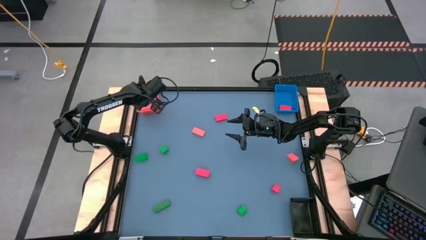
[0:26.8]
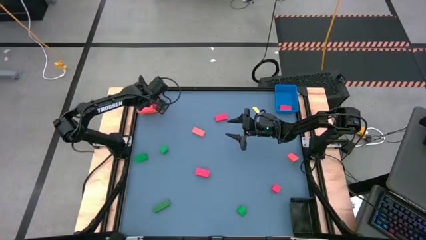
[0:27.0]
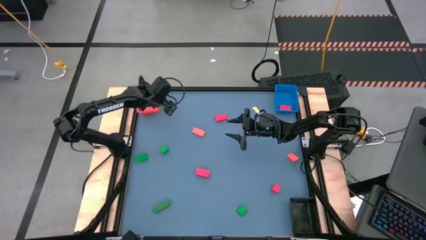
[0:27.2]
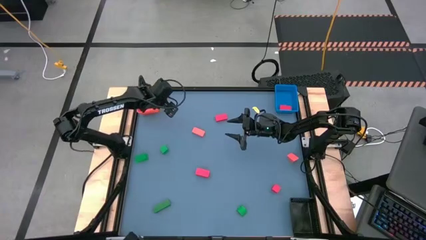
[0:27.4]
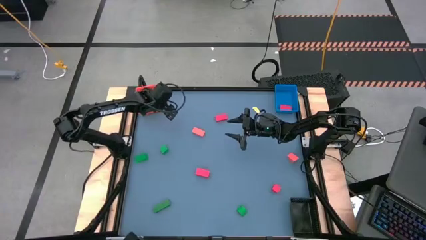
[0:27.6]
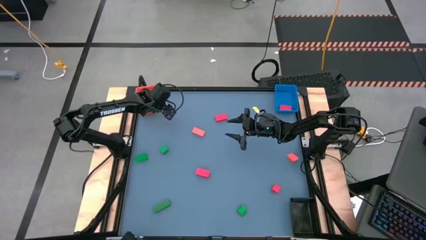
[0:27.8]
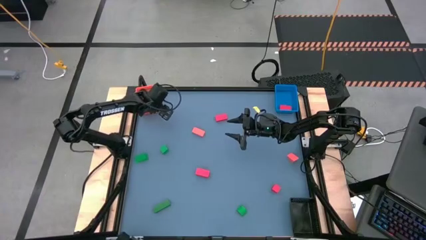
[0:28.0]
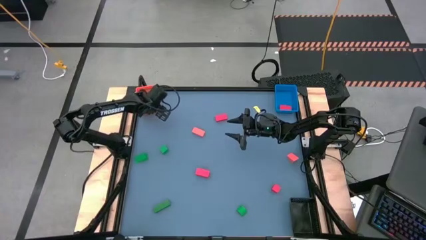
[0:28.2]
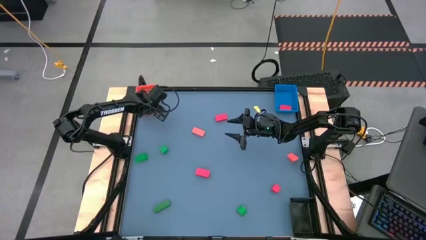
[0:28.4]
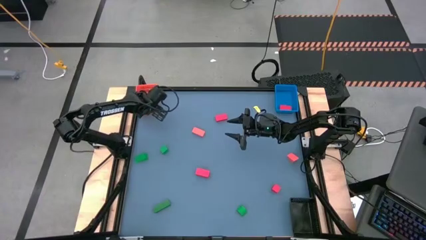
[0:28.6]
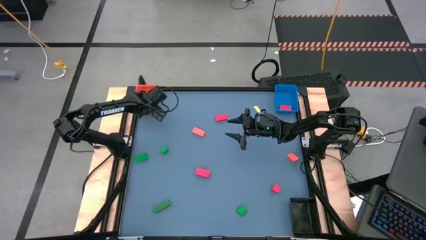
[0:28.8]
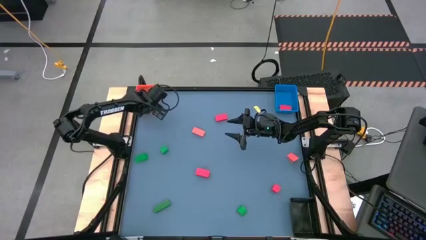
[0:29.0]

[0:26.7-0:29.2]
Task: Sort & place blocks by color
Adjust the orange bin

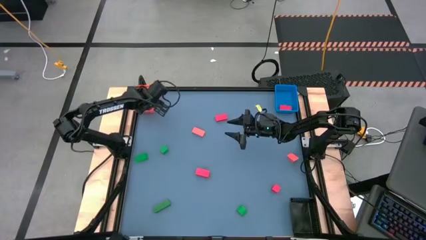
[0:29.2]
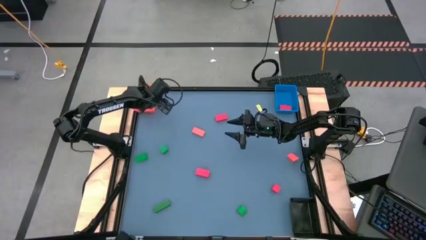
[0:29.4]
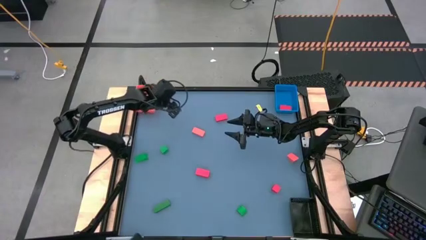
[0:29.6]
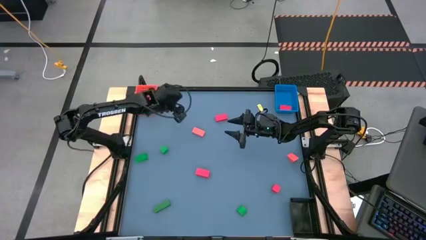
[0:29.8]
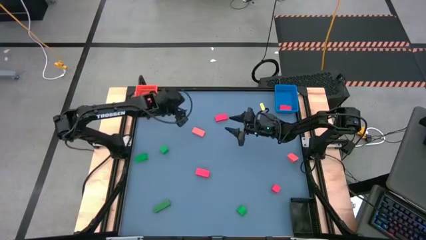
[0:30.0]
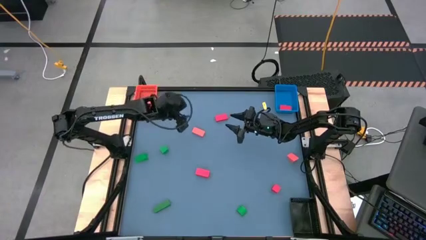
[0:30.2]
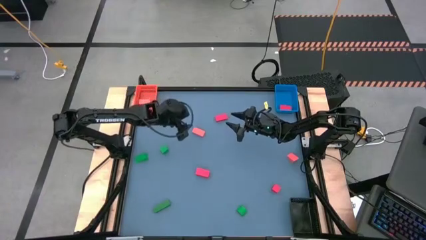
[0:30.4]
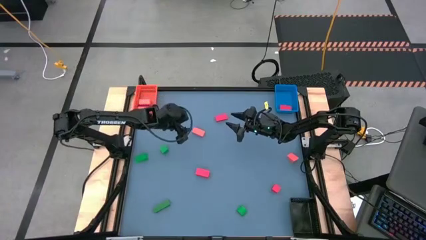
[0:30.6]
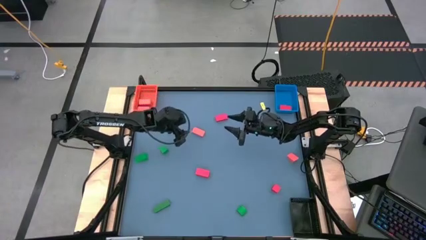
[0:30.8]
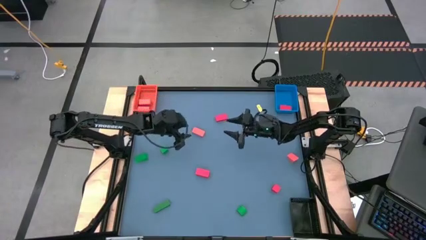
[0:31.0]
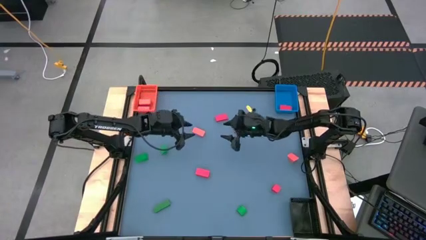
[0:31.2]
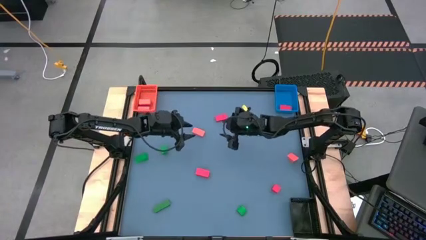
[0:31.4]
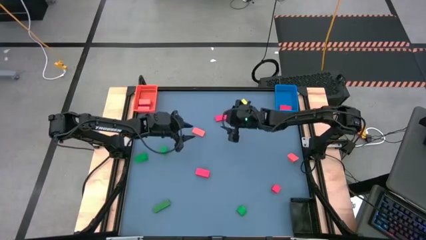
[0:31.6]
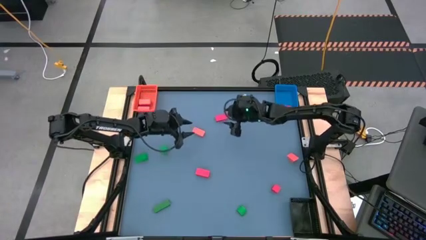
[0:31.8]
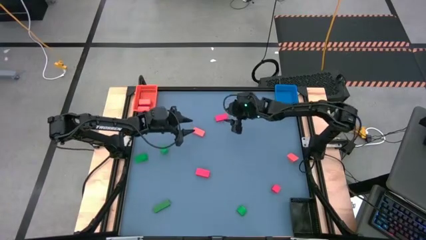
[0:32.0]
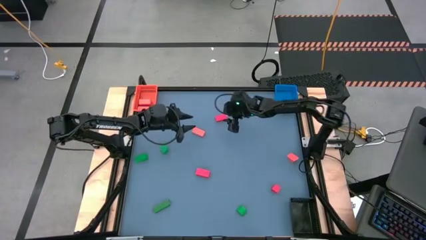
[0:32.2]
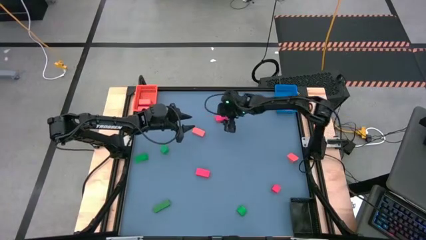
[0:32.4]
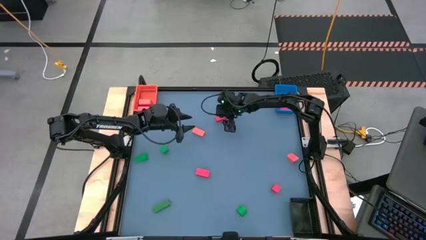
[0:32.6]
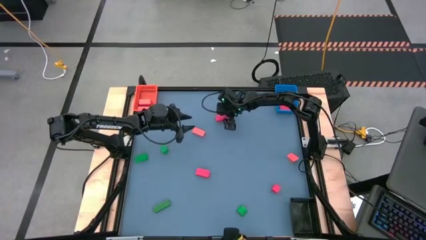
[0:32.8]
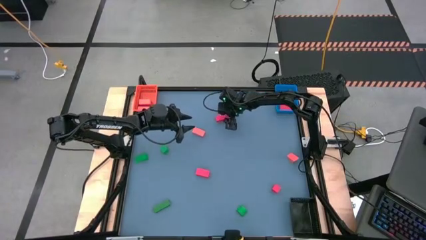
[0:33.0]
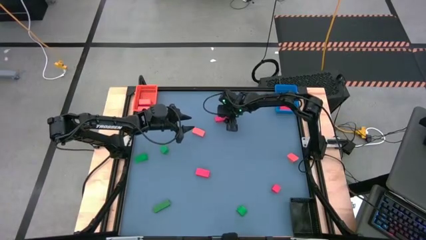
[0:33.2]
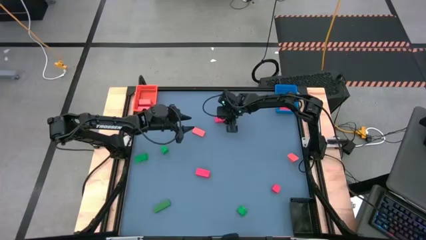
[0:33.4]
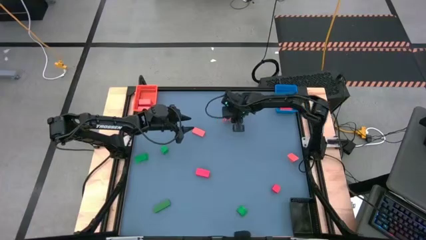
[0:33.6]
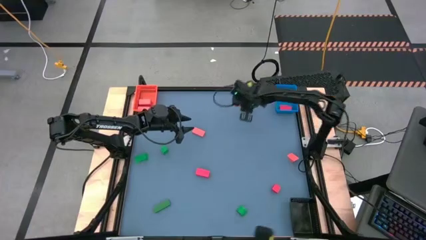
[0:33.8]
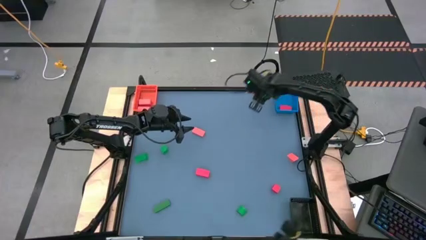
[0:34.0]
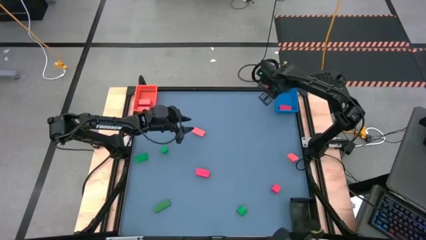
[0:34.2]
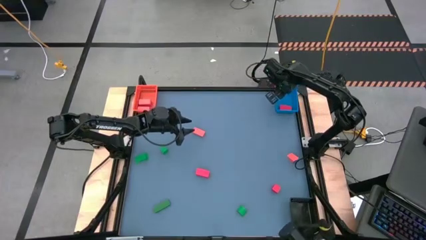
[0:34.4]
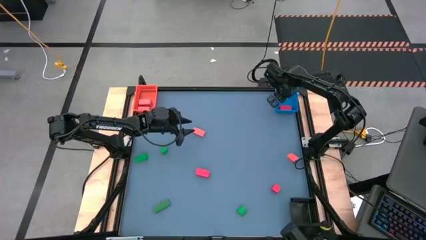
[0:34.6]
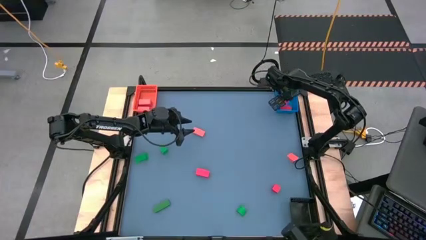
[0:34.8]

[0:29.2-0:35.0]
Put the pink block into the blue bin

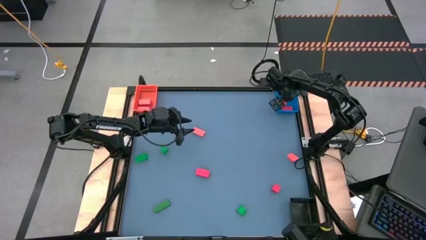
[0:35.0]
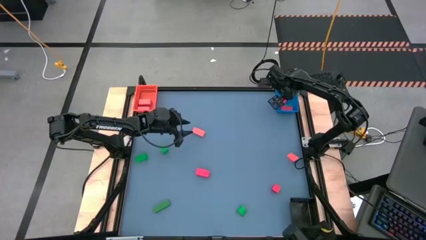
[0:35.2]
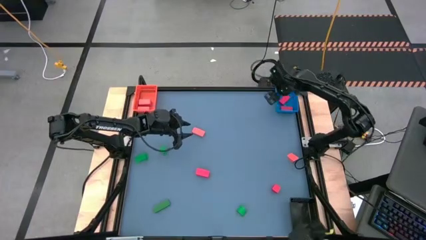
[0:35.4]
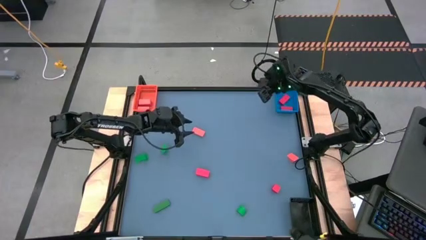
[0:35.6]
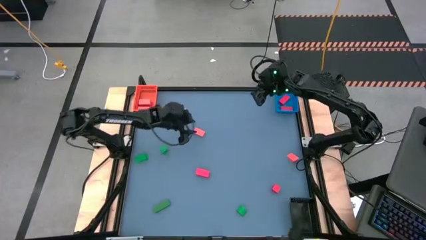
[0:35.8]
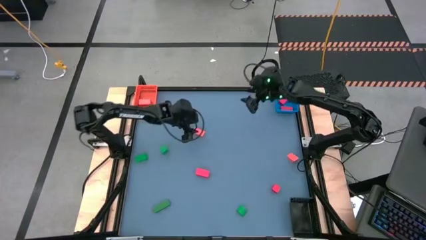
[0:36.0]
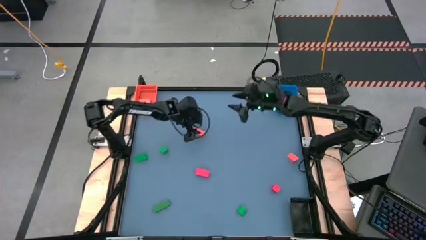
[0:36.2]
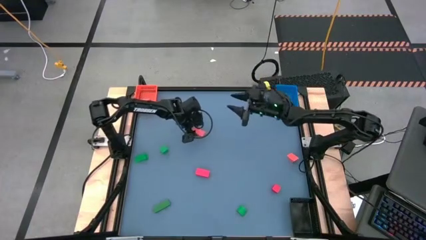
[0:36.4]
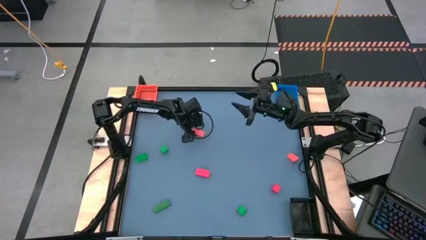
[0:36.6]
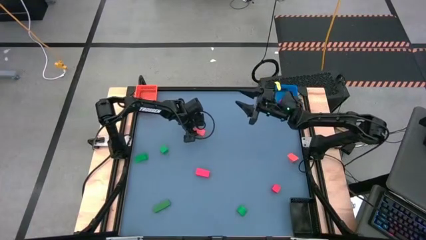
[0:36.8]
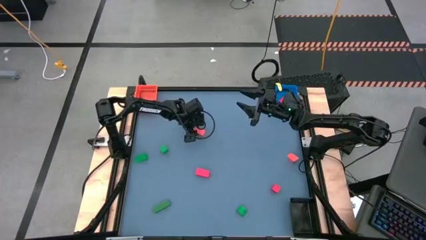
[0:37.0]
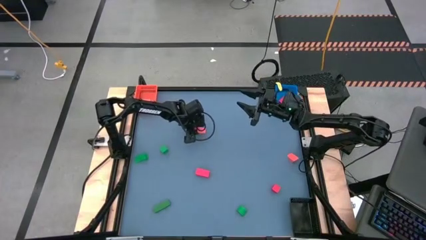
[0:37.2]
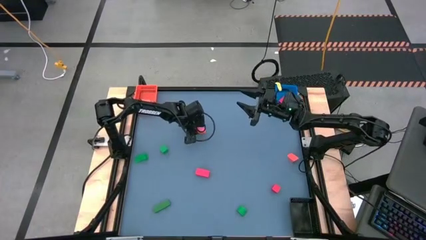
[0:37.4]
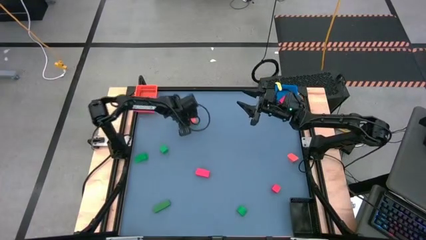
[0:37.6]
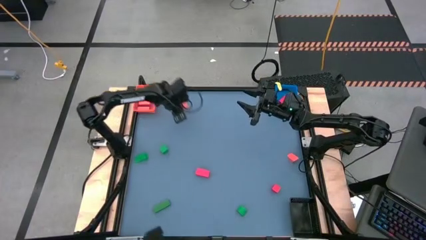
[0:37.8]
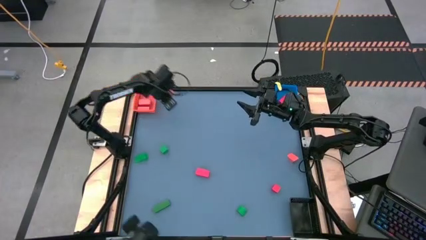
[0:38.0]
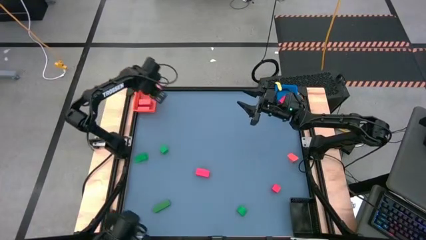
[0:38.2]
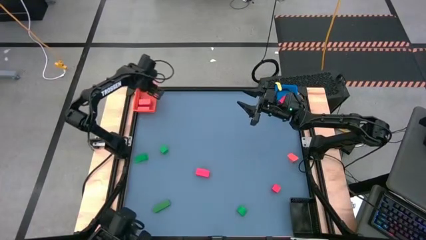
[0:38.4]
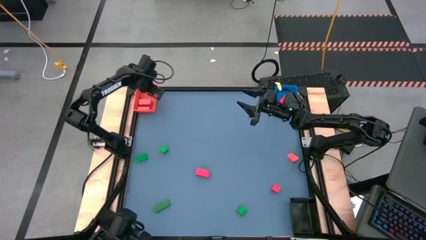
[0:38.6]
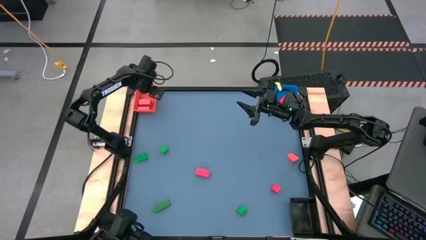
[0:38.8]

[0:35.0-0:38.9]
Put the orange block into the orange bin

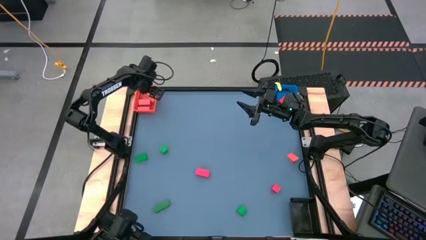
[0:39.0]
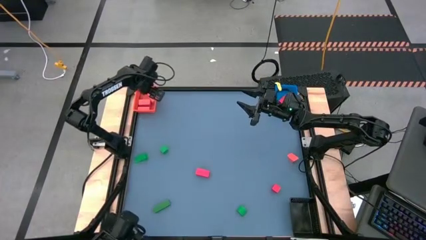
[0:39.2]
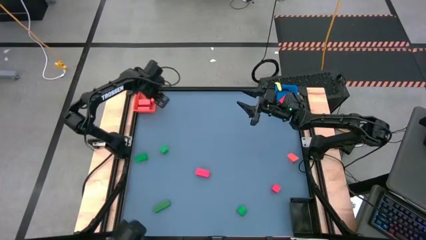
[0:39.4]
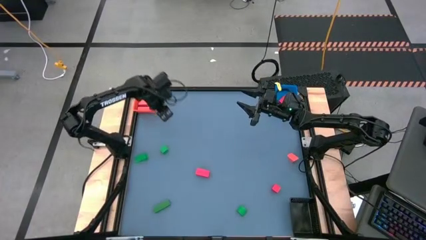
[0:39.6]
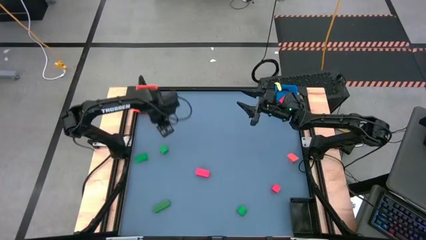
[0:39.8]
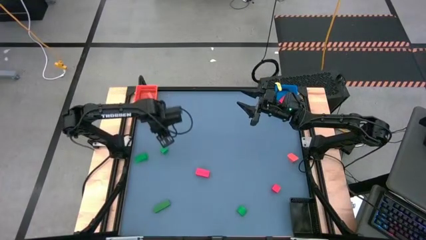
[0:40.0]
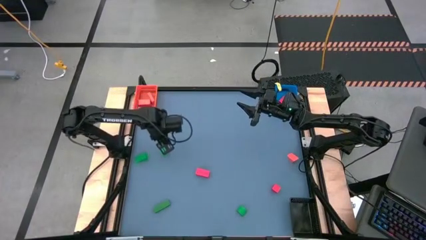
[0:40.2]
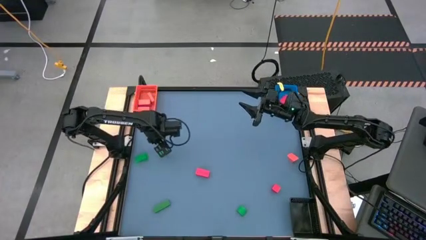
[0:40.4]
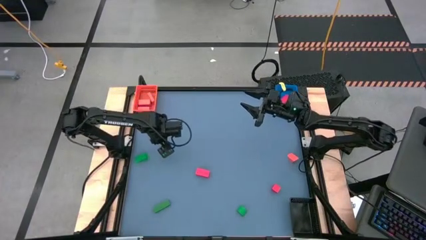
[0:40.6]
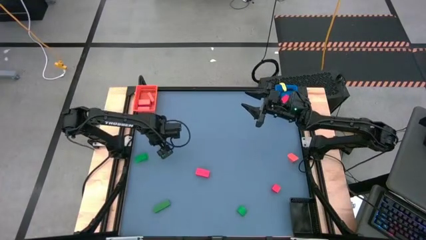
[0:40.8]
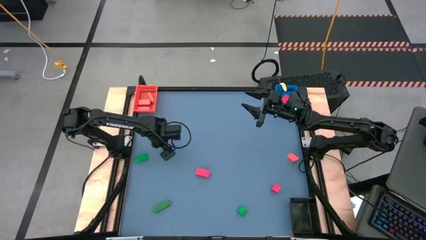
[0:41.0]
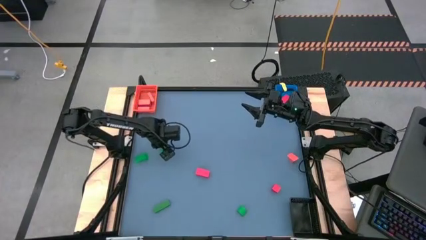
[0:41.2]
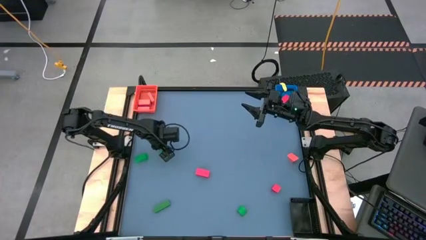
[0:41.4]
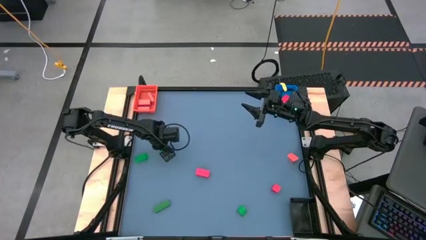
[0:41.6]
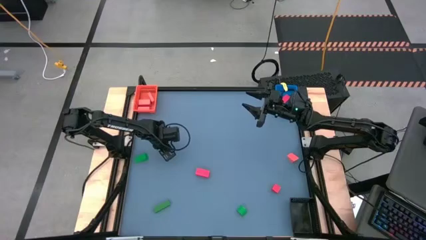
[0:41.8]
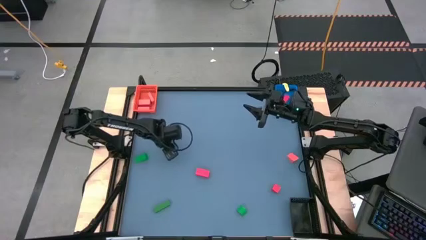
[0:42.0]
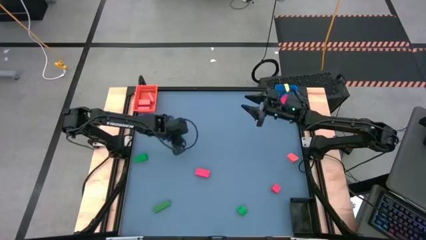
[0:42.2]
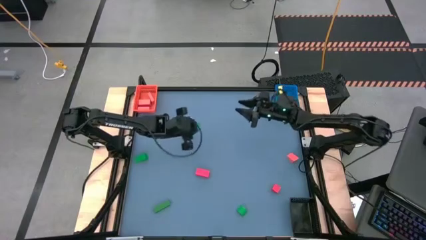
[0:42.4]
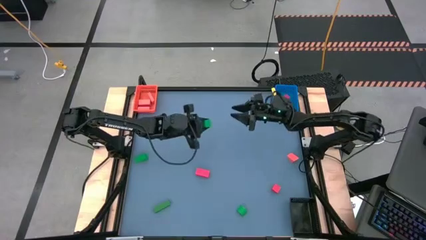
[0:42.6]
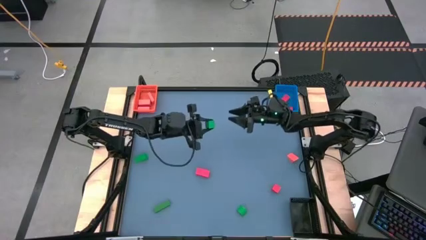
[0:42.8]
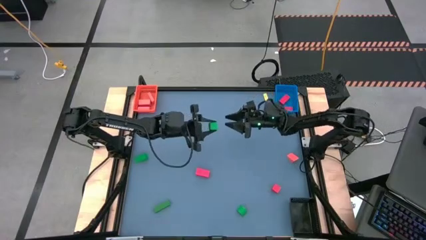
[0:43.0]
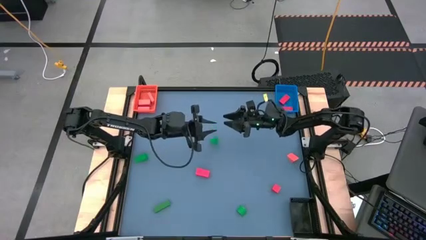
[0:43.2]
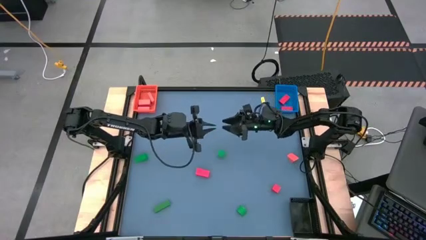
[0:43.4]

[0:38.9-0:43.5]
Put the green block into the black bin
